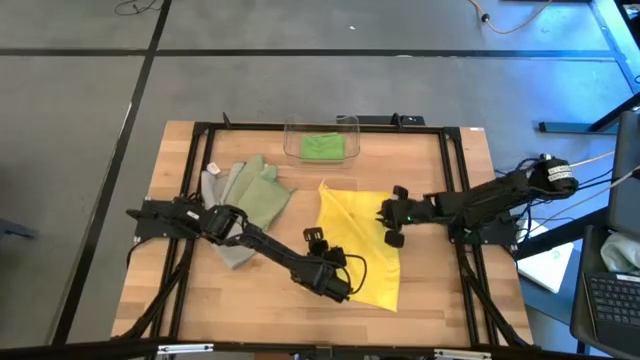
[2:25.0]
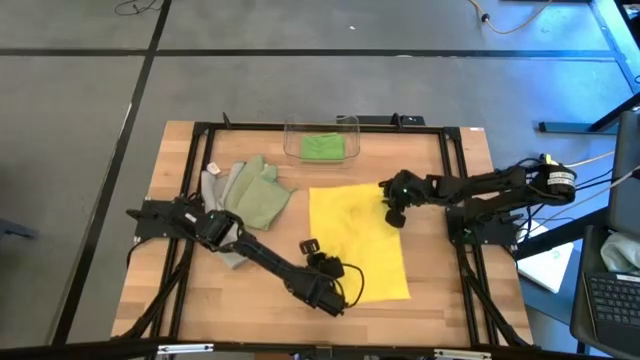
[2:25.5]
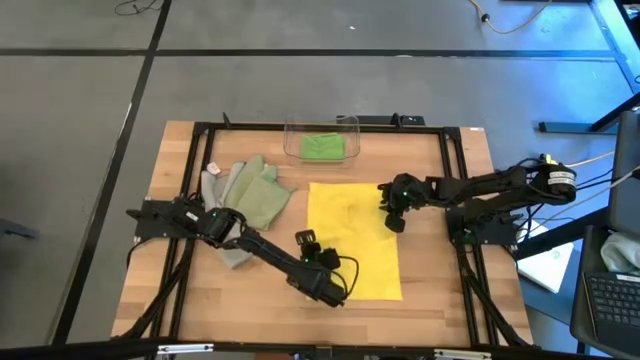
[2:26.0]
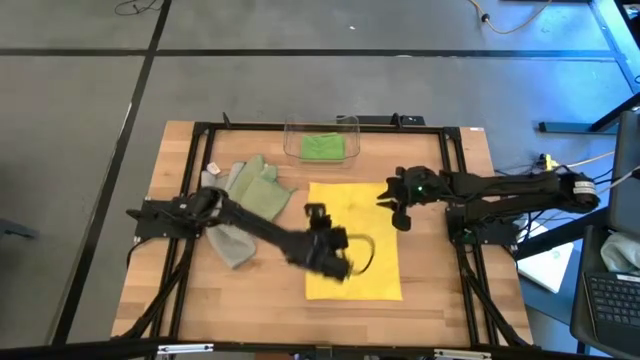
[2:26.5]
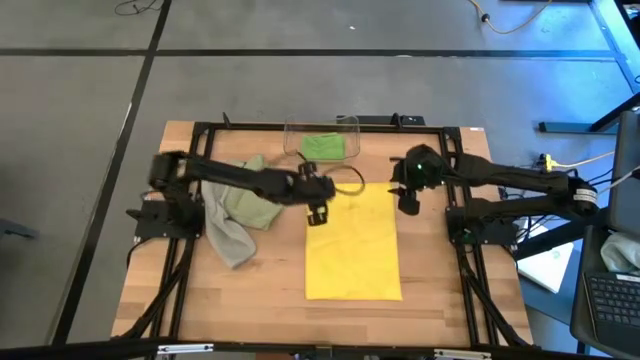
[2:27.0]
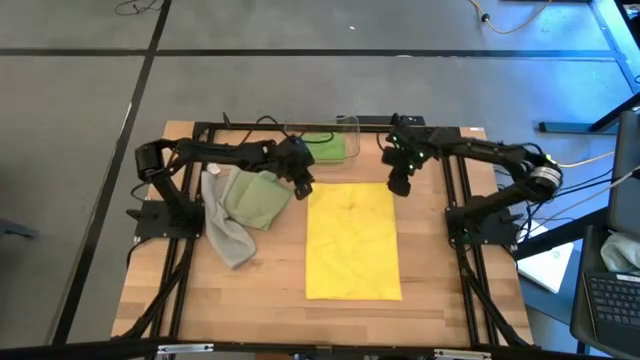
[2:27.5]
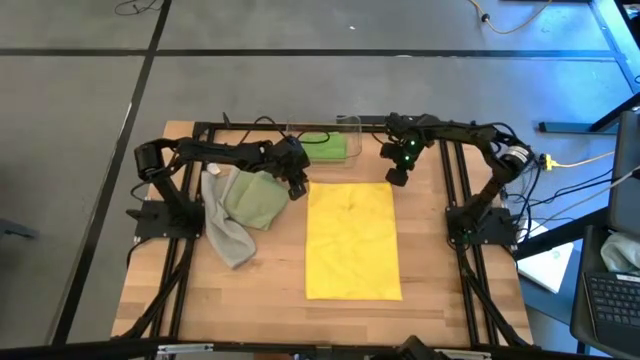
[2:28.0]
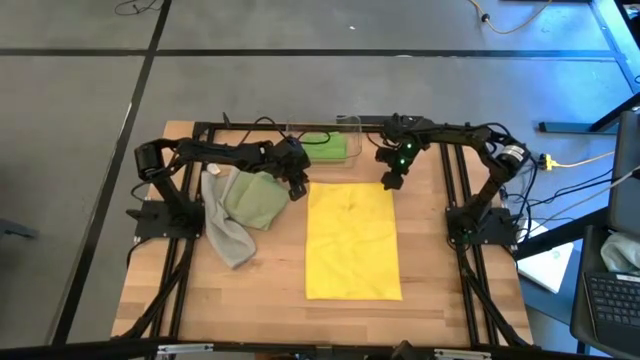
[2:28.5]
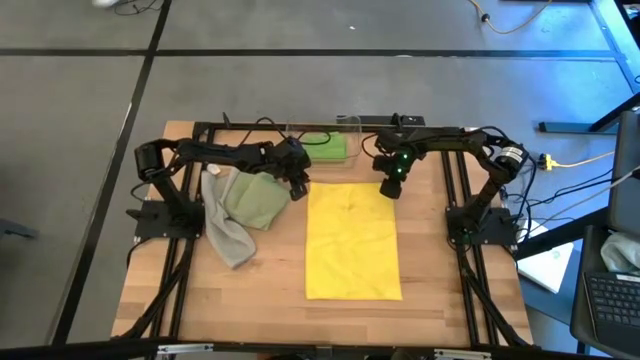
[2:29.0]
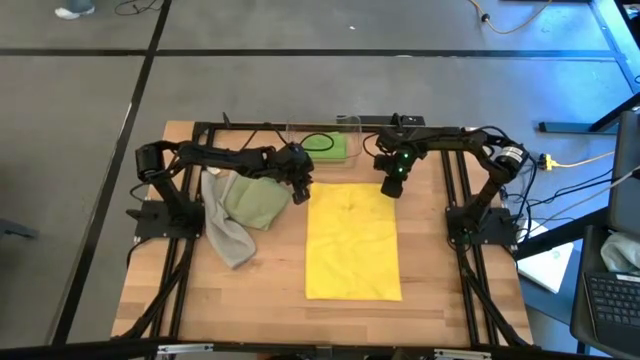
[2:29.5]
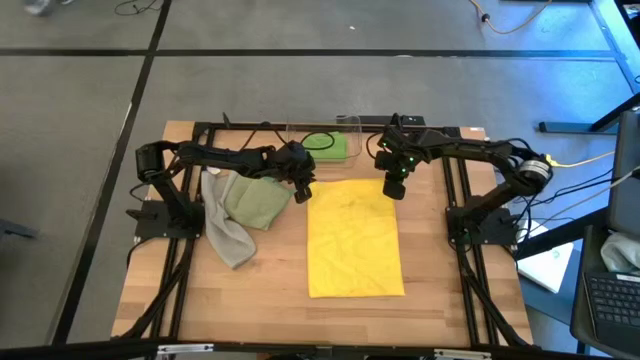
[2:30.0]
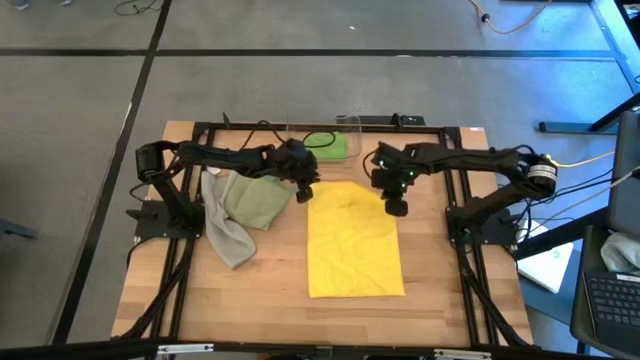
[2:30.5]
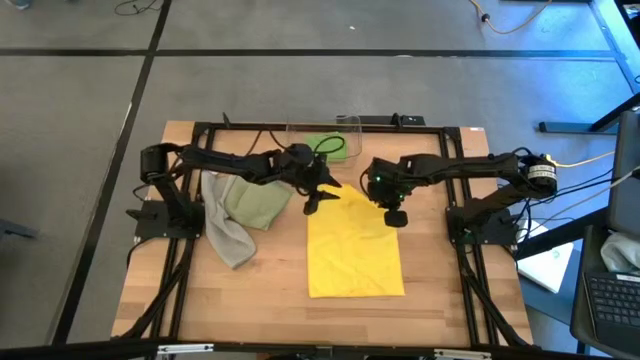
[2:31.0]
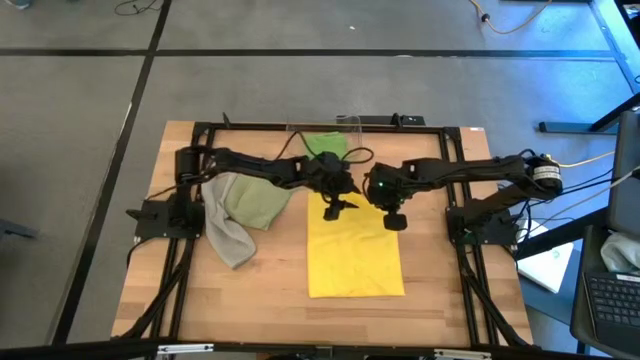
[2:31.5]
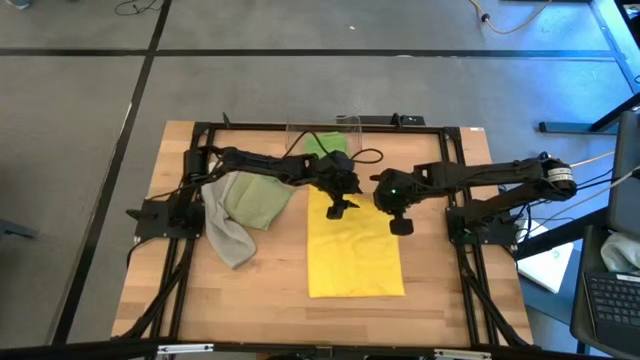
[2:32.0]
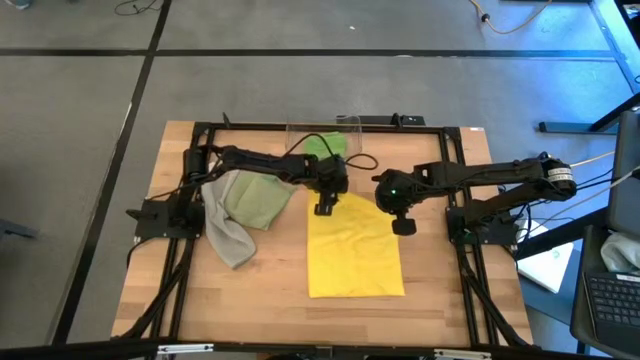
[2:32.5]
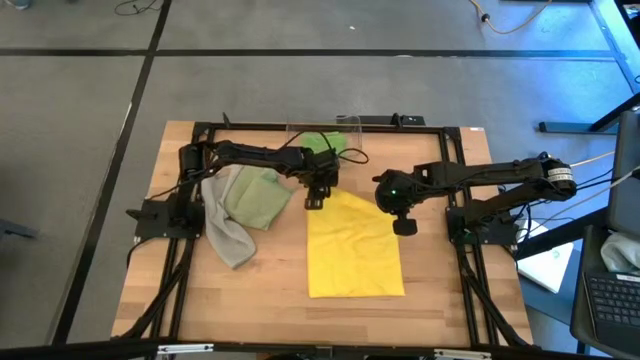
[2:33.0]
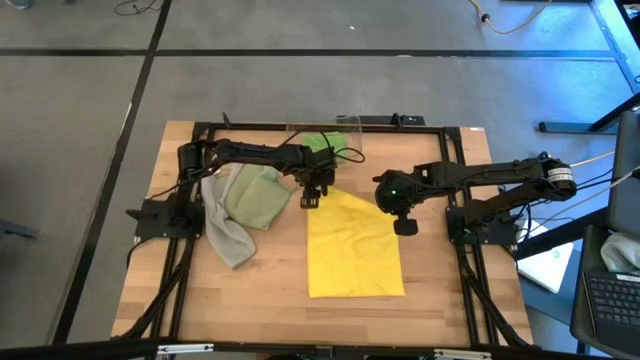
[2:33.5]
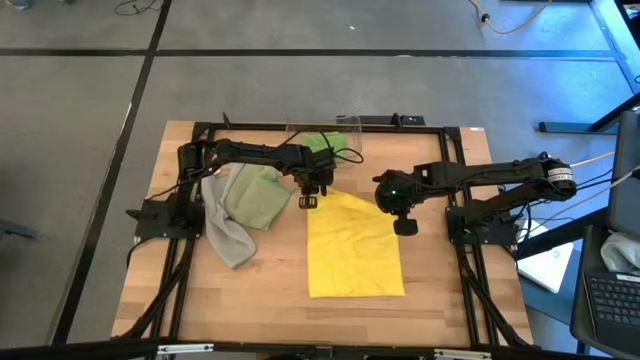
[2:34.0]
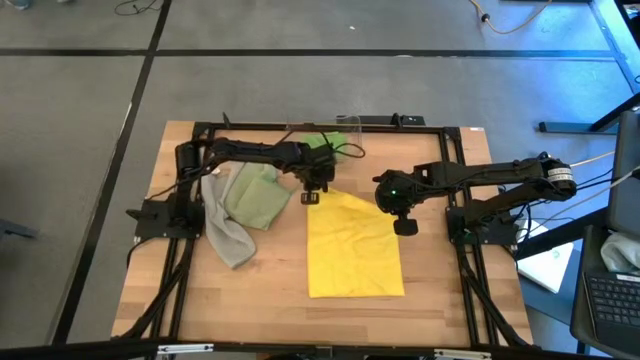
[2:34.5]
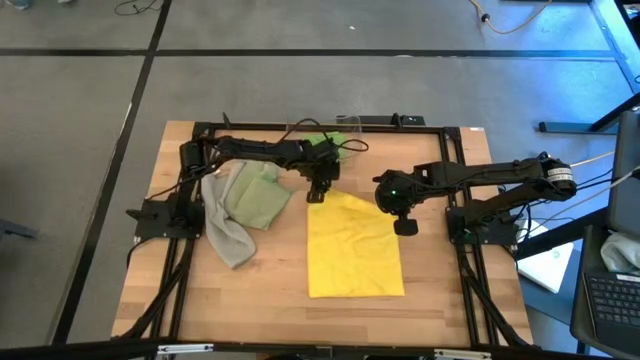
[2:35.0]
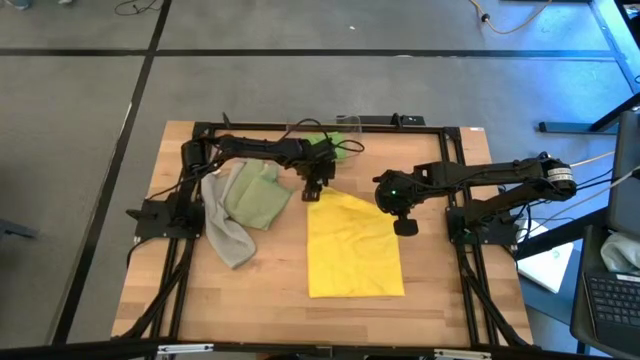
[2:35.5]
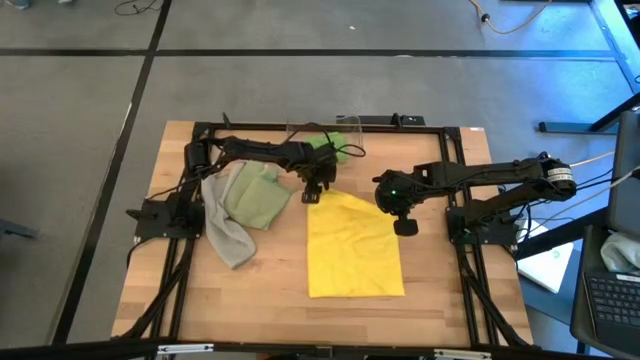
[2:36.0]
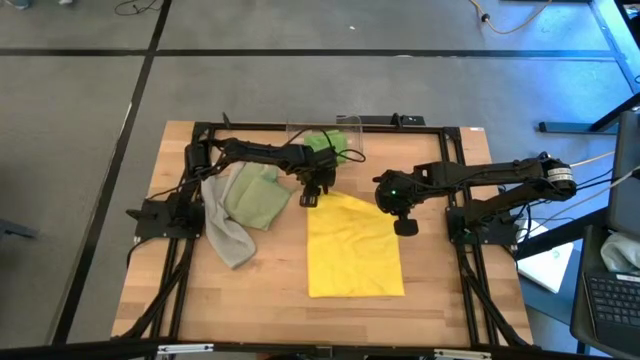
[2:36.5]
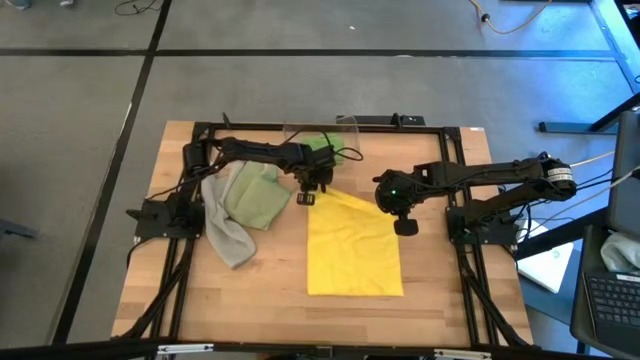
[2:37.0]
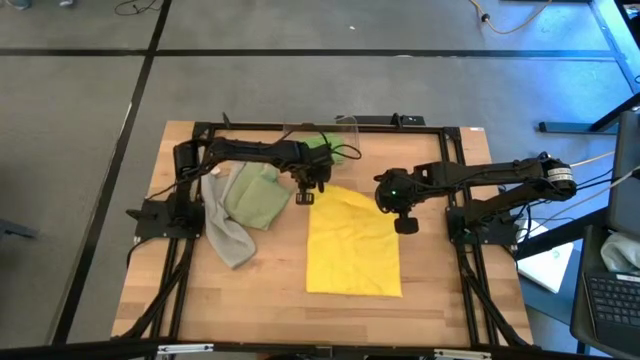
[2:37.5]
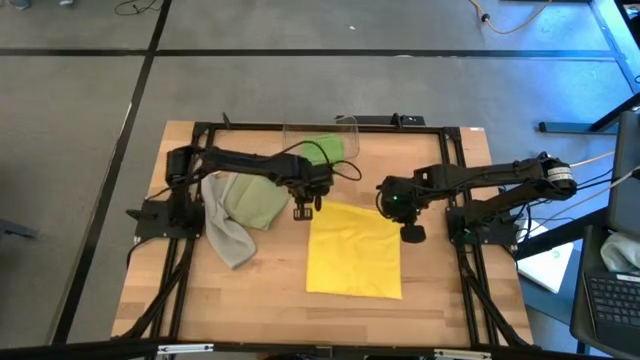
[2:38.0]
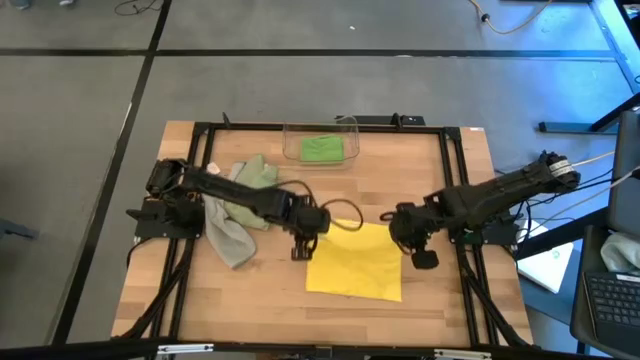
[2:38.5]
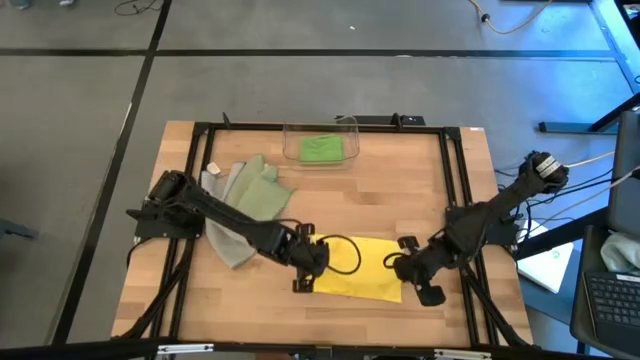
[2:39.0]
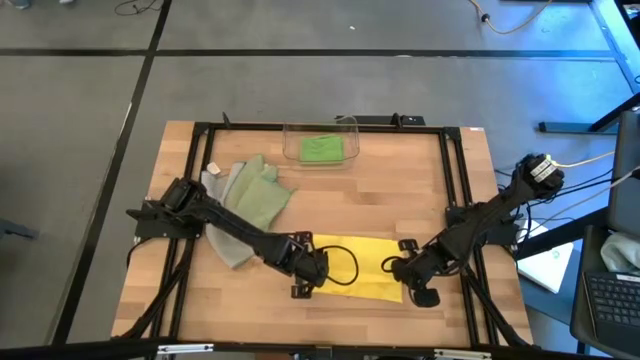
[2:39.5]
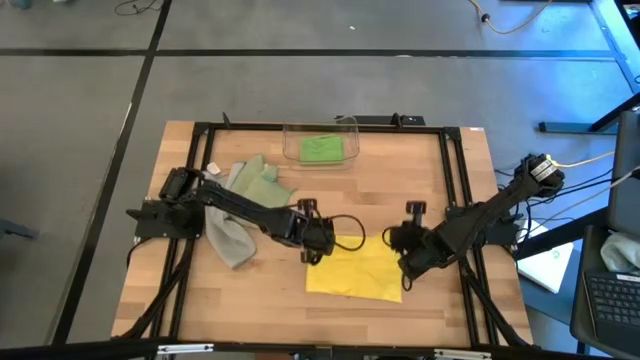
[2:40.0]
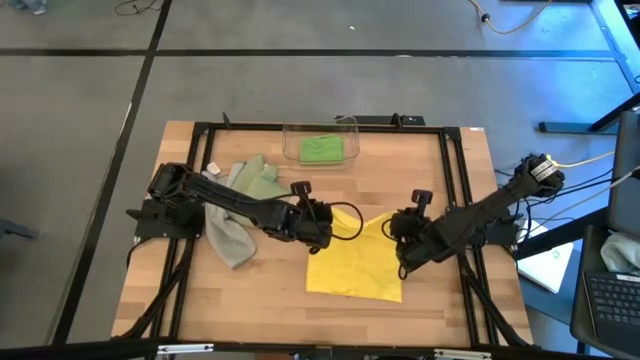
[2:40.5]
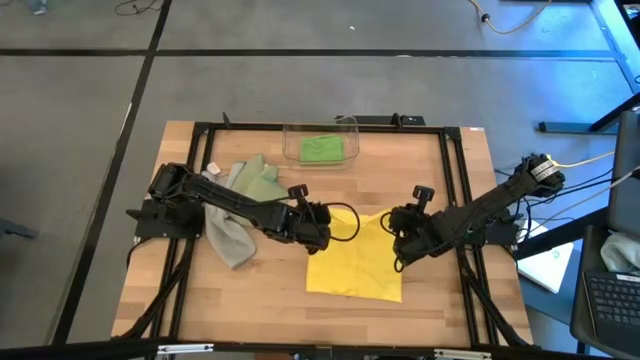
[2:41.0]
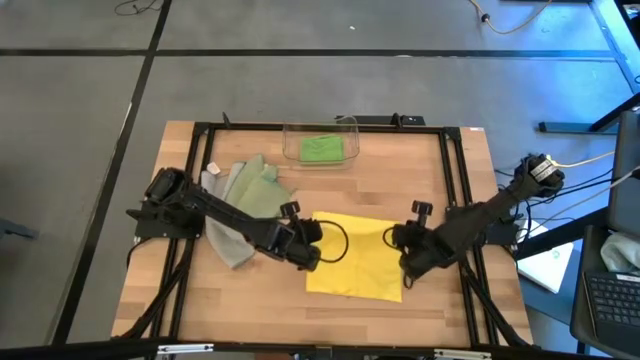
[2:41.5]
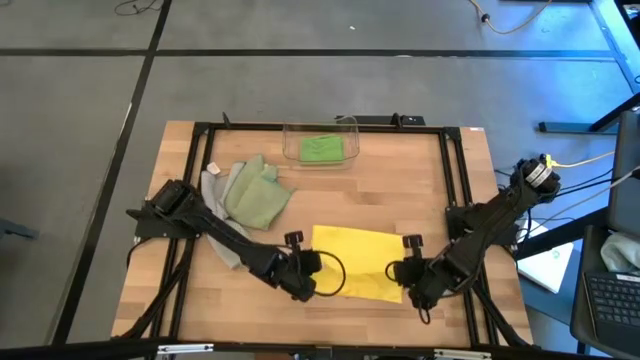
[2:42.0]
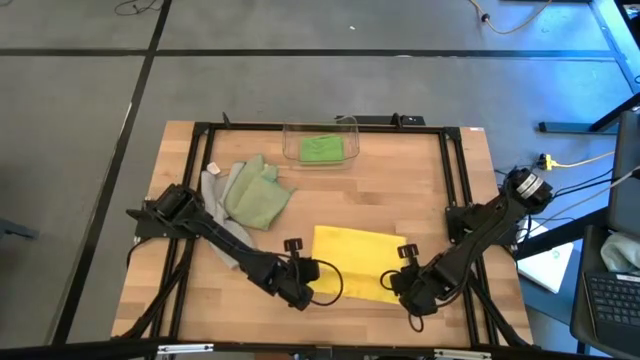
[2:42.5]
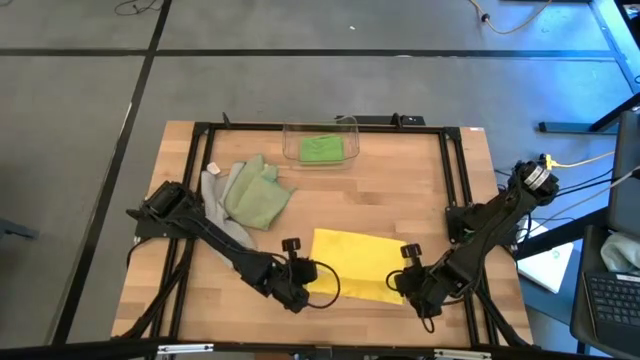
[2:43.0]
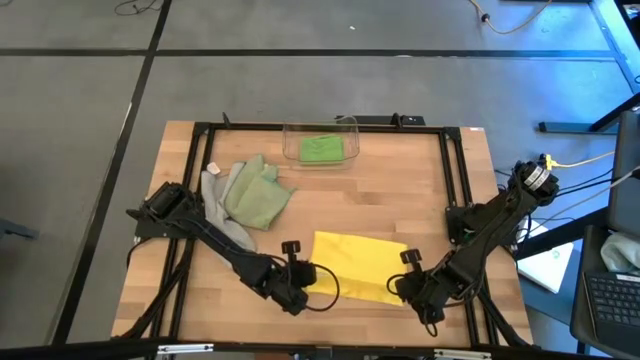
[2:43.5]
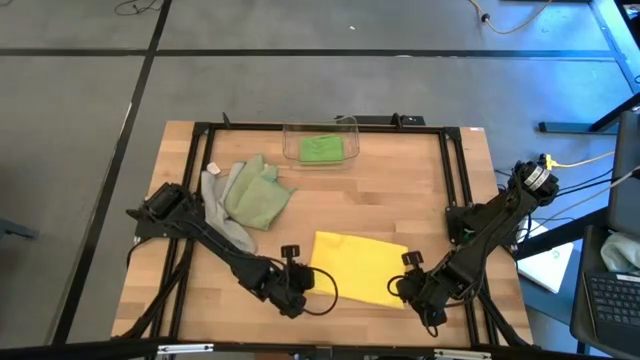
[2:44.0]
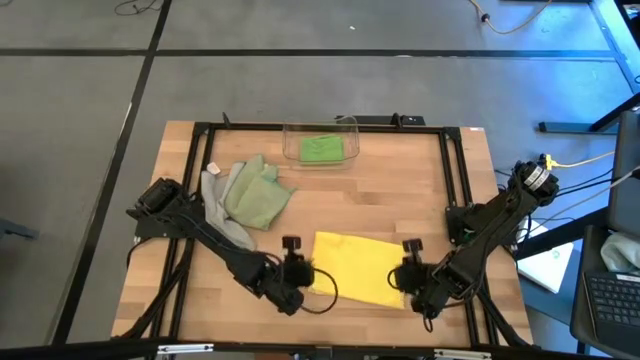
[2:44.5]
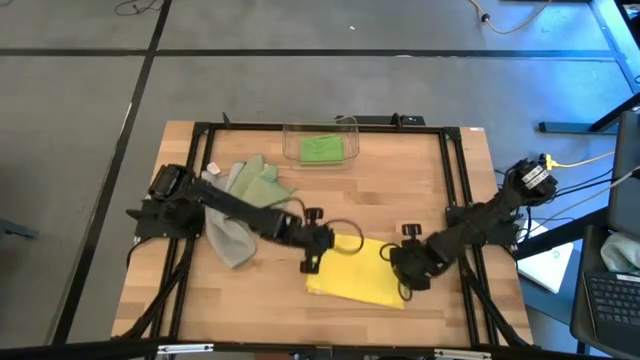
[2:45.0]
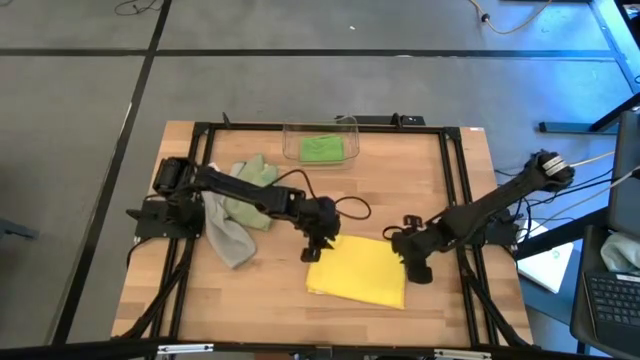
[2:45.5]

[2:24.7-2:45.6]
Task: Fold microfiber towels
Fold the yellow microfiber cloth
